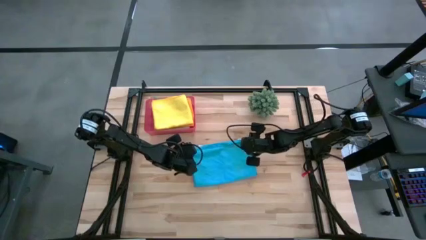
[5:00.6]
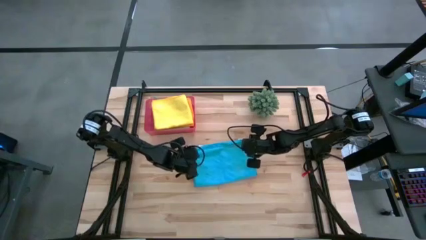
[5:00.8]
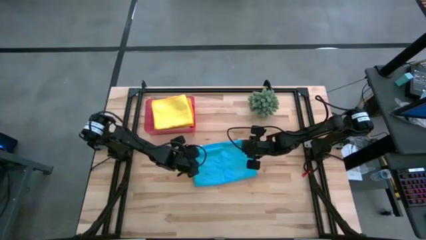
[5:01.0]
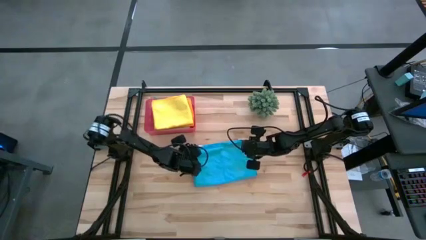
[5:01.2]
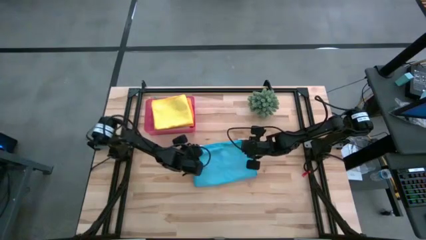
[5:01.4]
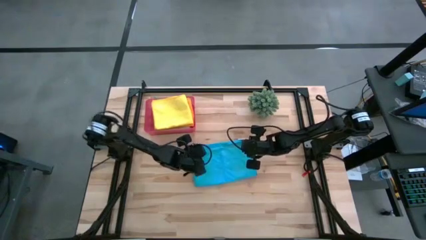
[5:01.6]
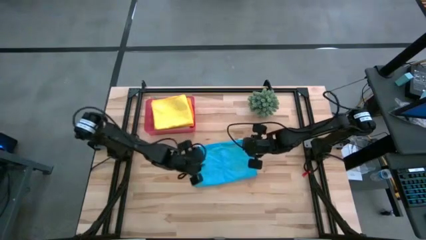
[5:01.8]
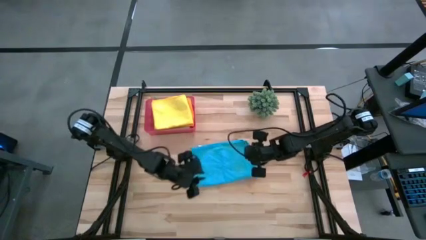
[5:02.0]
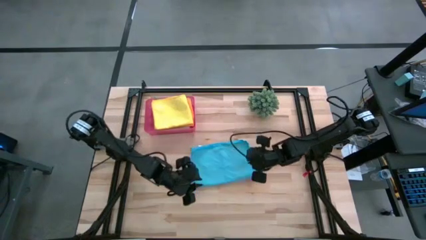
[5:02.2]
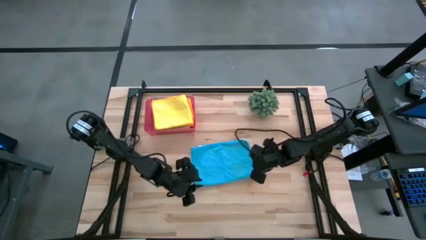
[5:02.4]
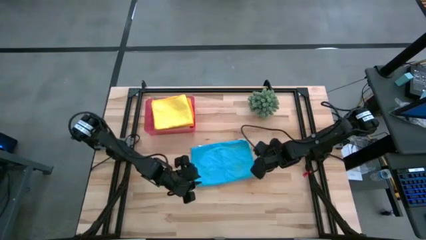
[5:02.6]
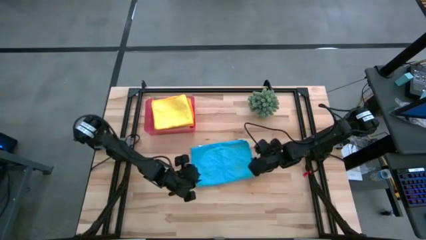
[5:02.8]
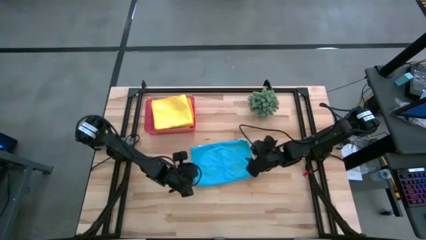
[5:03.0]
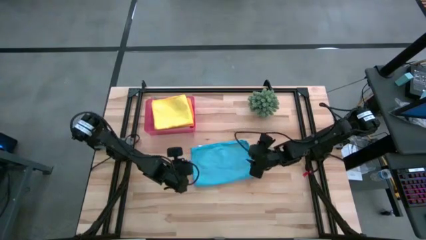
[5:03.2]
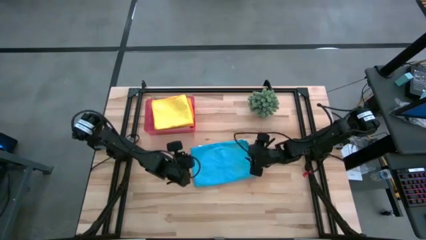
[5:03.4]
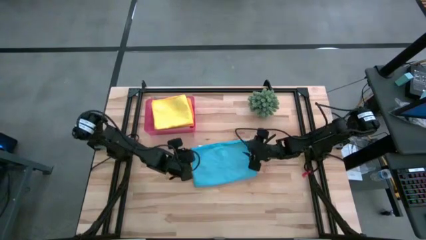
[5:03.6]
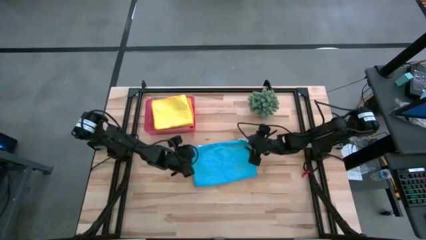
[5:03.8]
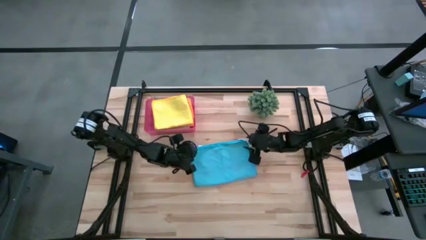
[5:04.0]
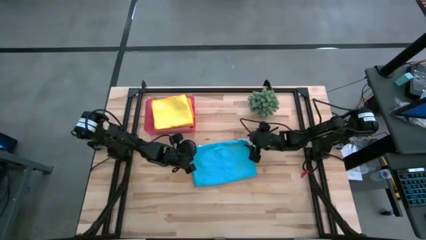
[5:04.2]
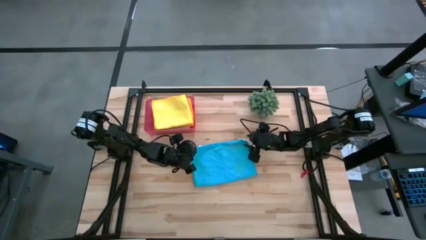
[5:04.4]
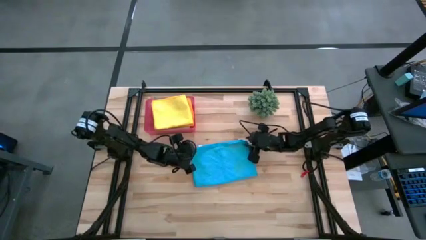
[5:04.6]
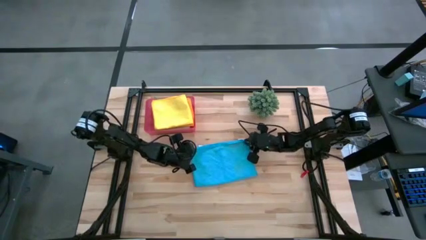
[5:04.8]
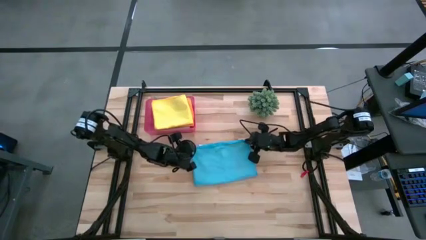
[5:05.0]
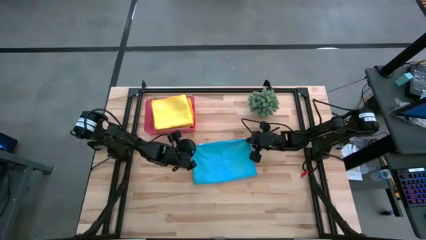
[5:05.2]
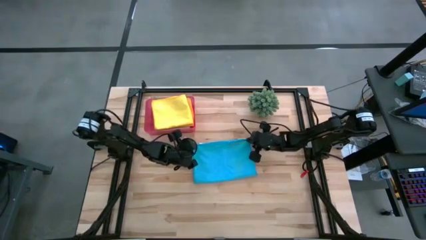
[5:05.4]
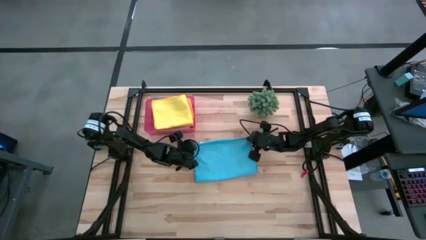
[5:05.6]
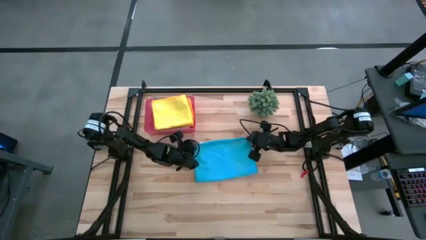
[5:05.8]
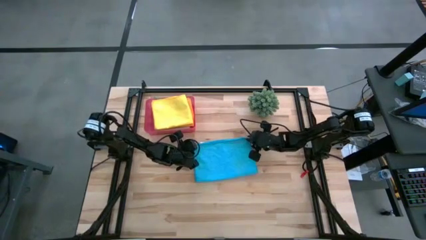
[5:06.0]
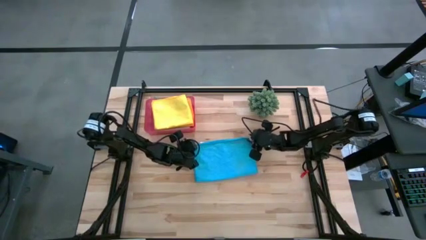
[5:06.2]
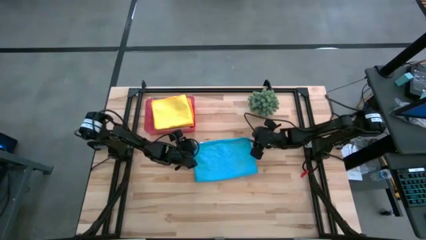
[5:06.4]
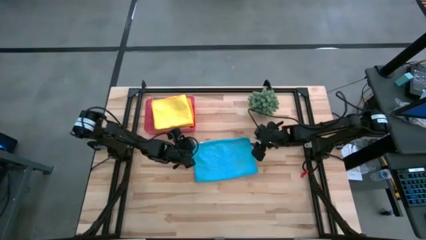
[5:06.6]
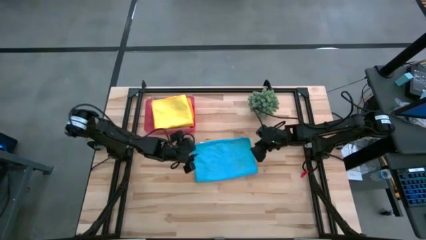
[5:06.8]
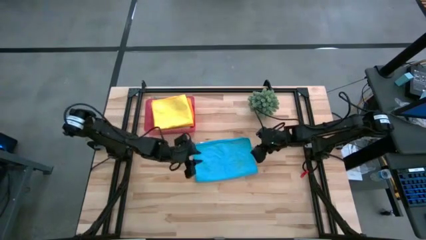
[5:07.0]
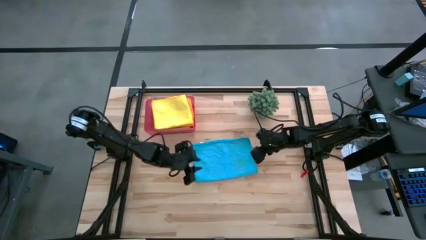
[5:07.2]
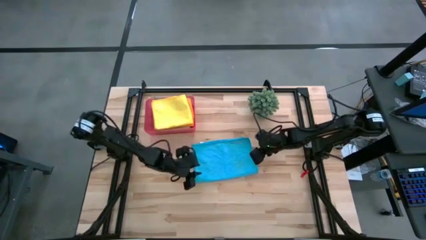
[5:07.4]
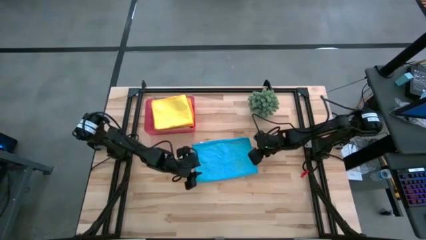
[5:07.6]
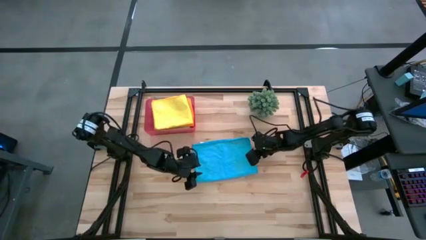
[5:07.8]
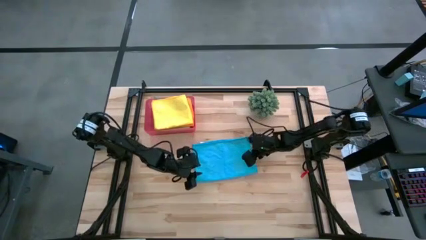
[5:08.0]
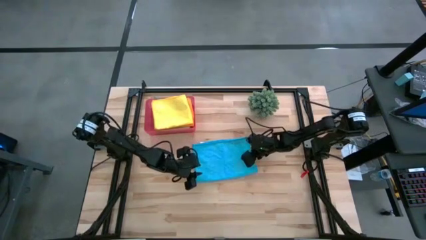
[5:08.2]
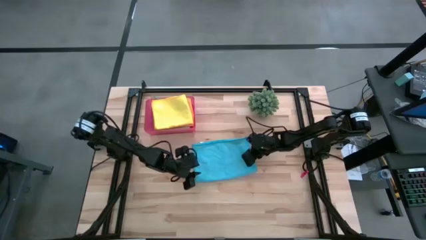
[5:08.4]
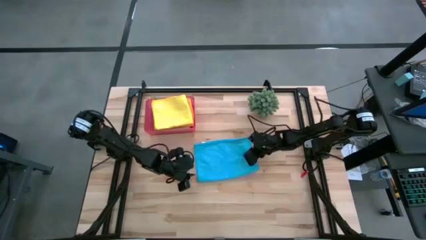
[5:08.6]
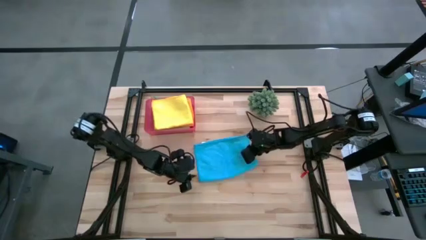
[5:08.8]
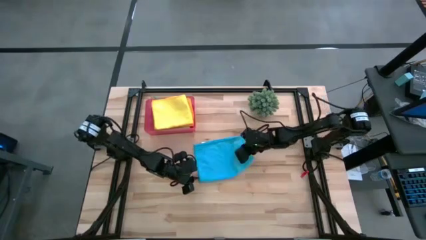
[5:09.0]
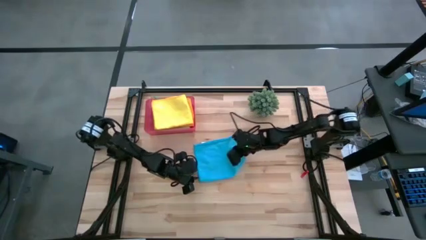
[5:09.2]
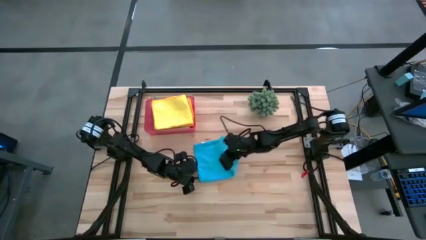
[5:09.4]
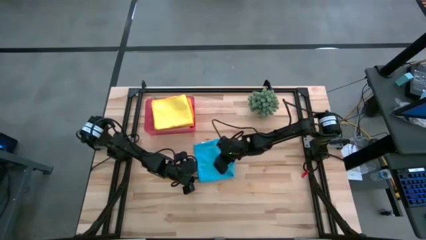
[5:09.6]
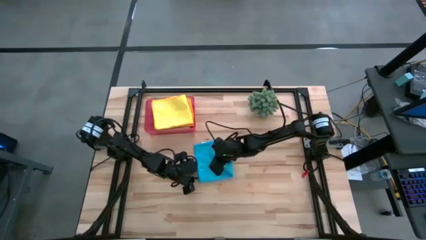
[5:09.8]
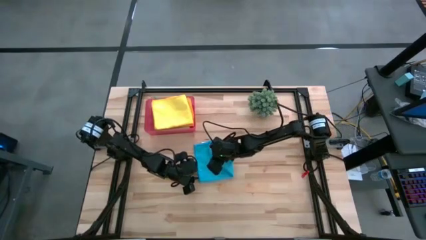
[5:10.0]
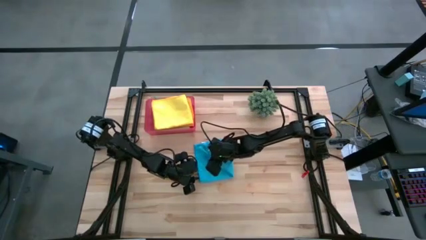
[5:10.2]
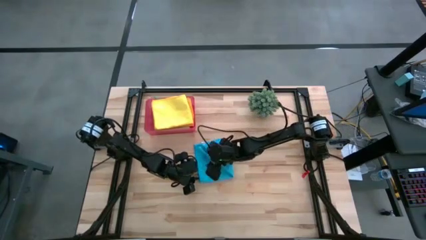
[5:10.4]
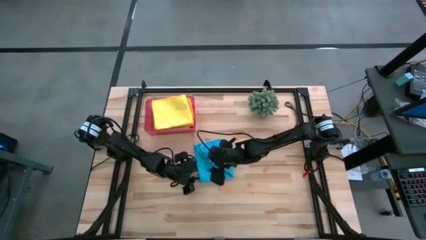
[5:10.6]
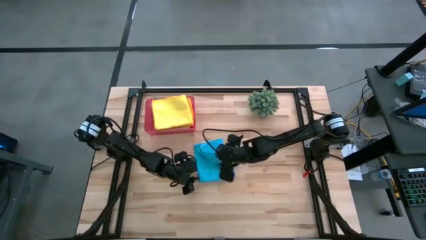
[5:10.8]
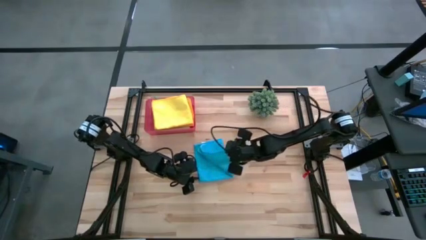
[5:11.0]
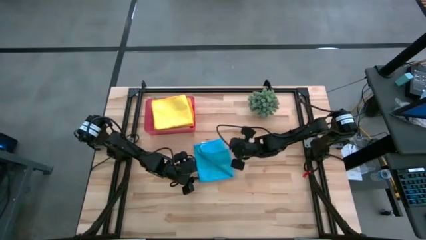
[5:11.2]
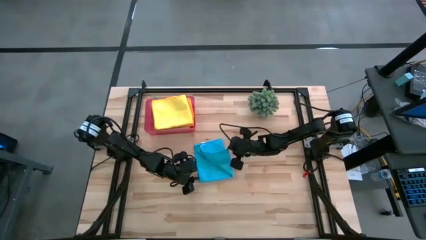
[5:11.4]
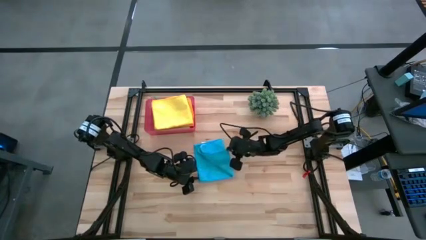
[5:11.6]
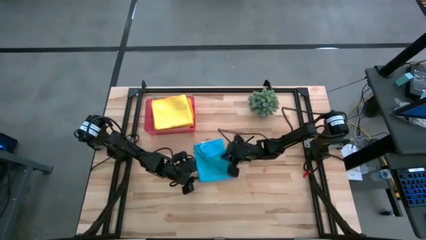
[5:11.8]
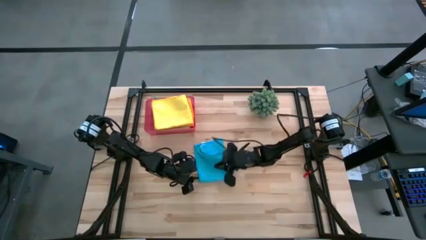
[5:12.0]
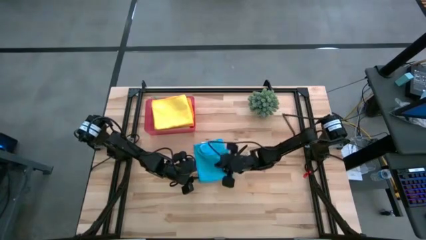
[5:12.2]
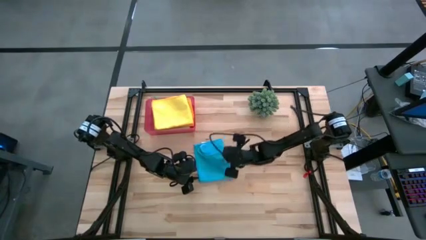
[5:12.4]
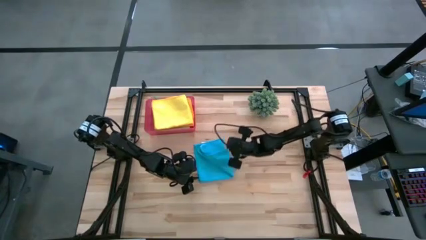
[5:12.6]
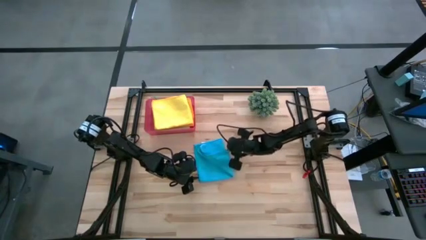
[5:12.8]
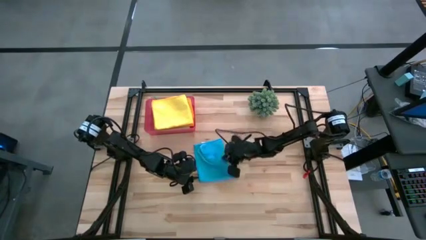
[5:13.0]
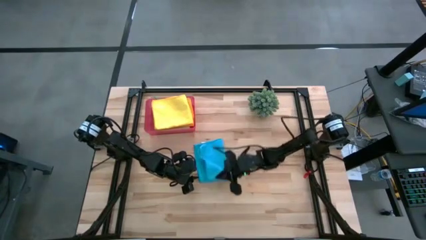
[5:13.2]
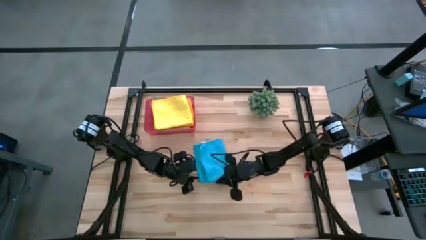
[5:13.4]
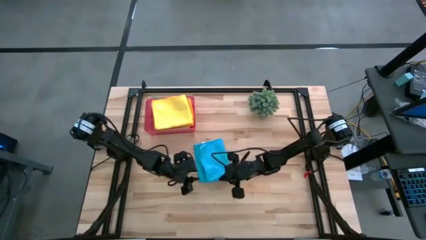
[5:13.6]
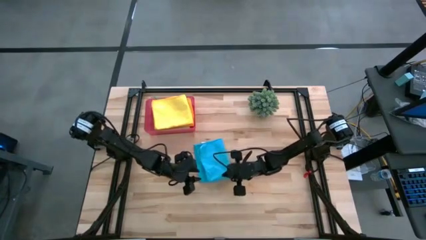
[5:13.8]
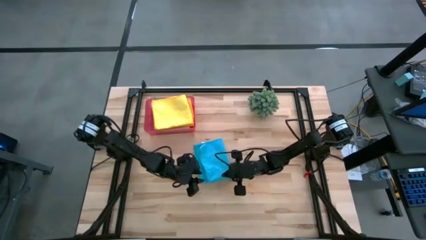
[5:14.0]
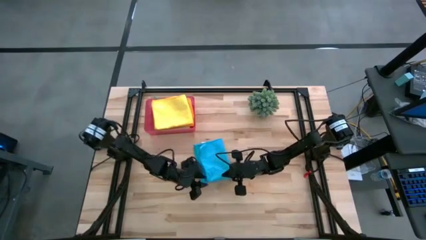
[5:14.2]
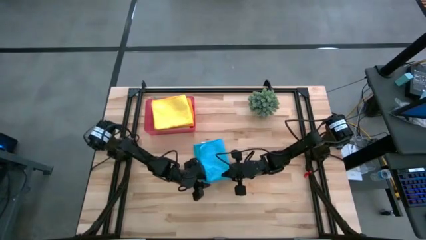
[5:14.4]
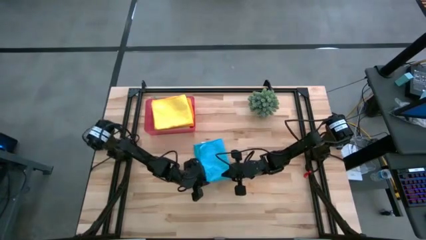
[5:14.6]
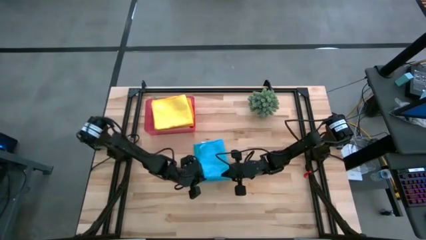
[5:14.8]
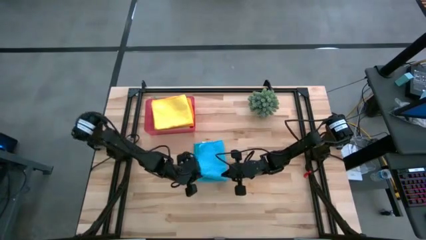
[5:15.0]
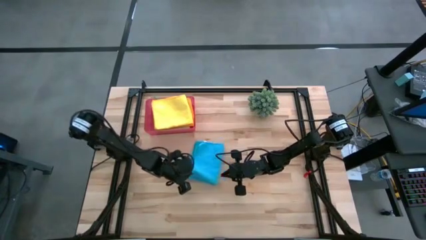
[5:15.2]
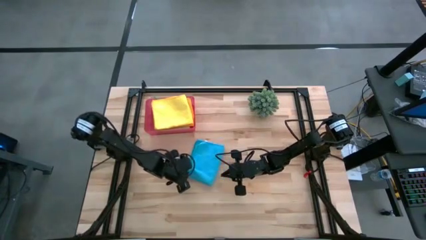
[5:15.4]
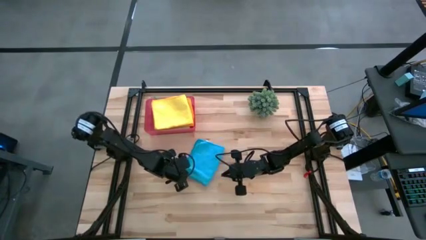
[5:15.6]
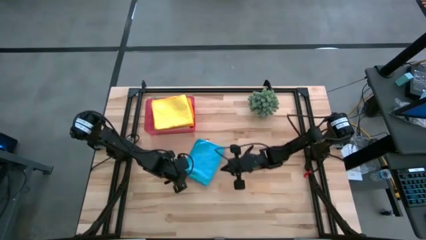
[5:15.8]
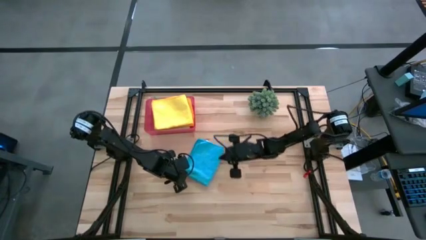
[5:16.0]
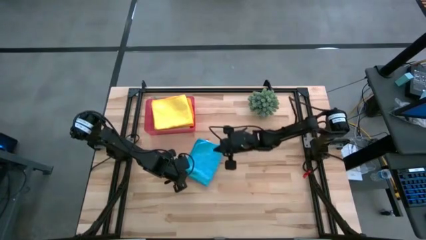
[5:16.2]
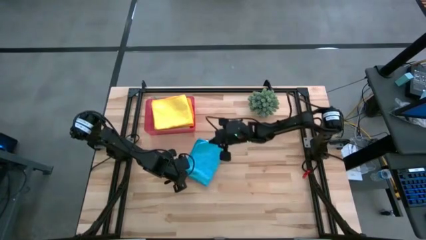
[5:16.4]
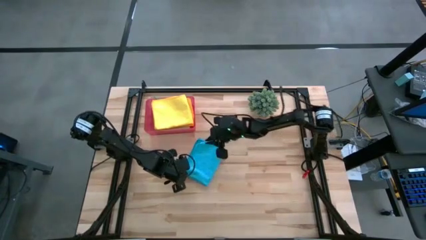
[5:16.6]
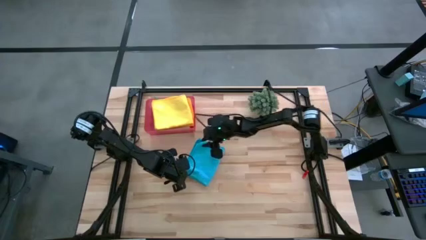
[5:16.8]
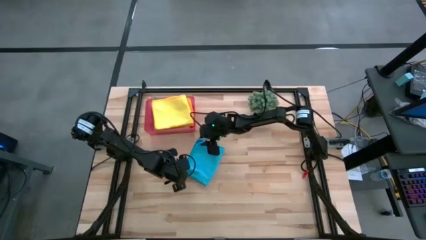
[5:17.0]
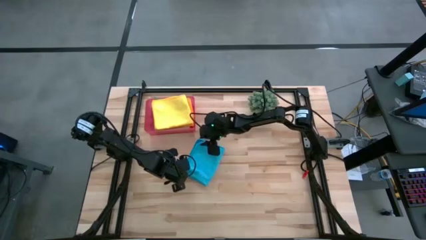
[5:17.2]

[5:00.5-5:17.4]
Task: Fold microfiber towels
Fold the blue towel
